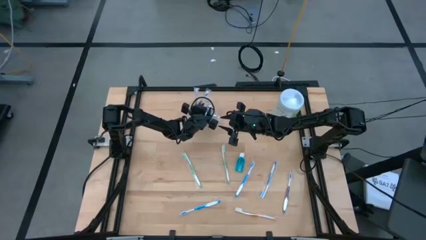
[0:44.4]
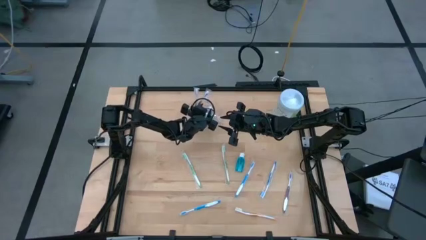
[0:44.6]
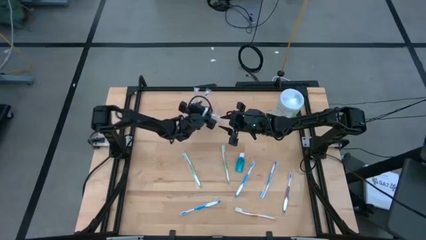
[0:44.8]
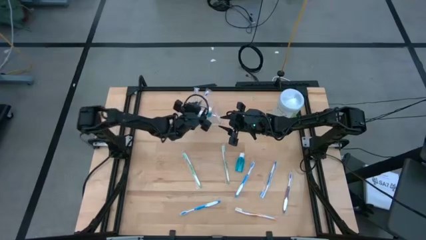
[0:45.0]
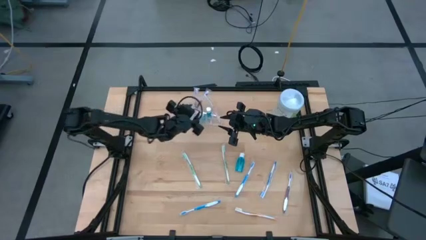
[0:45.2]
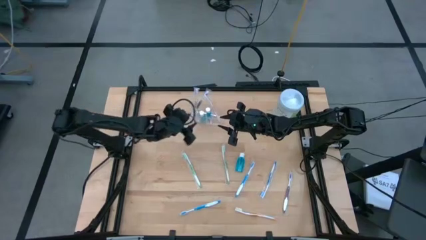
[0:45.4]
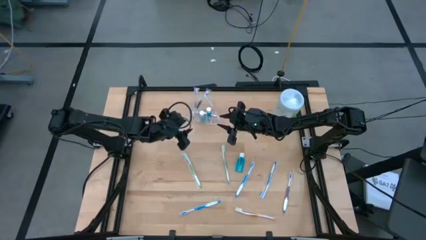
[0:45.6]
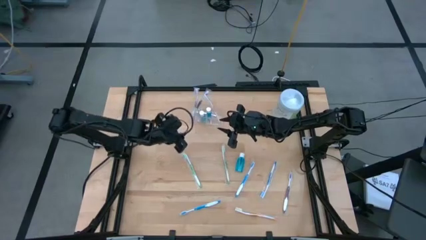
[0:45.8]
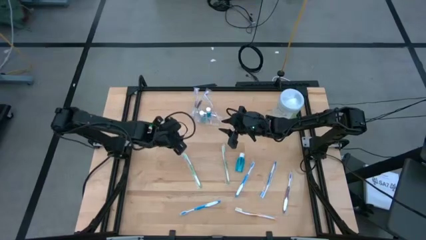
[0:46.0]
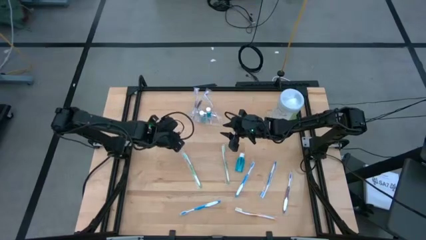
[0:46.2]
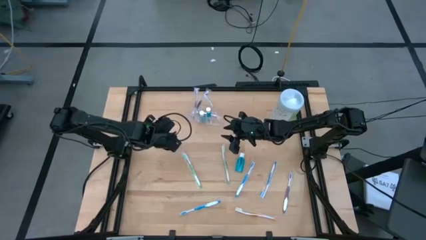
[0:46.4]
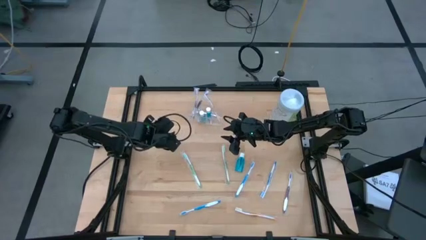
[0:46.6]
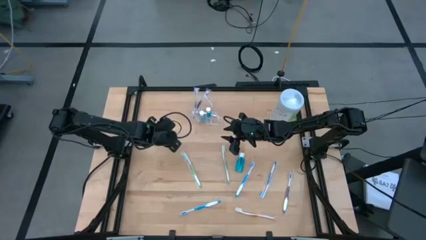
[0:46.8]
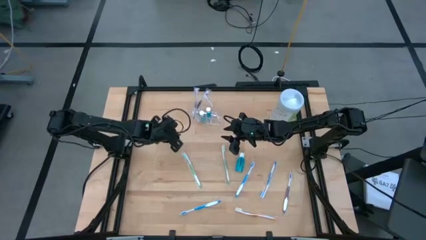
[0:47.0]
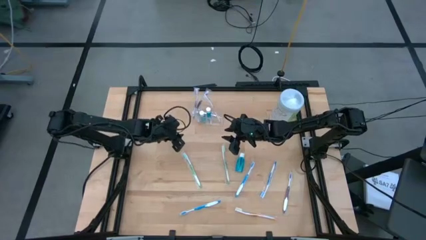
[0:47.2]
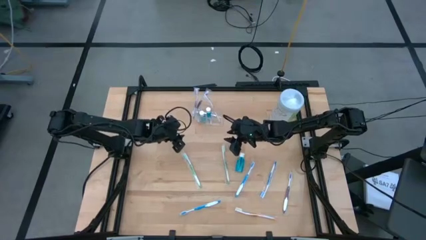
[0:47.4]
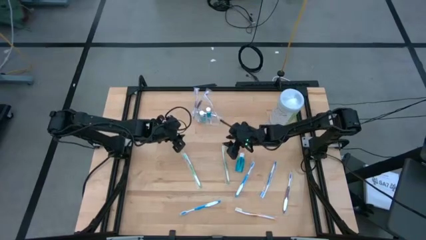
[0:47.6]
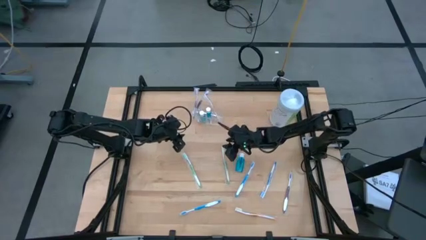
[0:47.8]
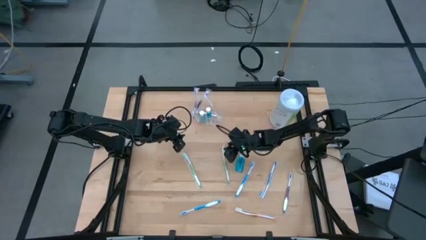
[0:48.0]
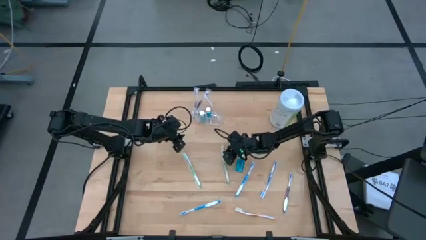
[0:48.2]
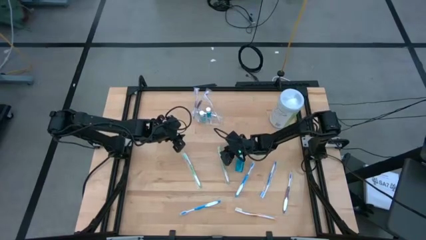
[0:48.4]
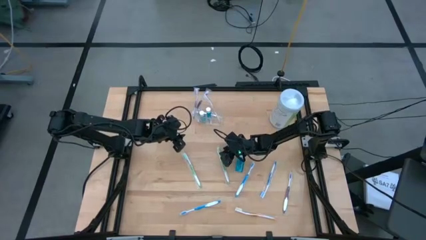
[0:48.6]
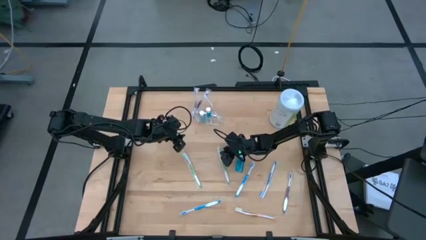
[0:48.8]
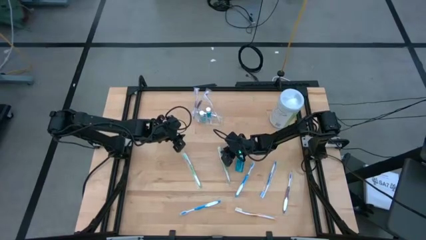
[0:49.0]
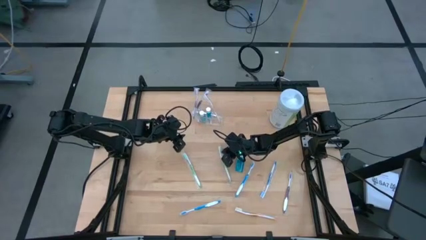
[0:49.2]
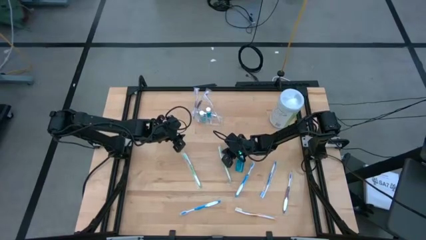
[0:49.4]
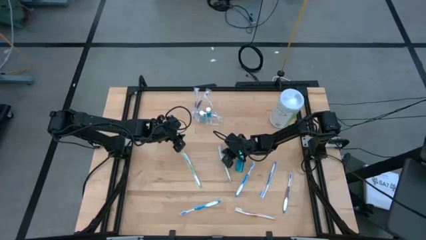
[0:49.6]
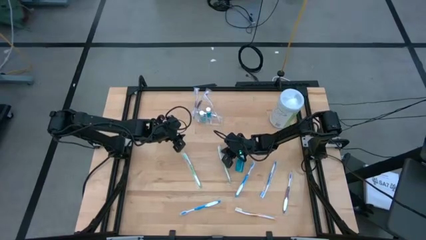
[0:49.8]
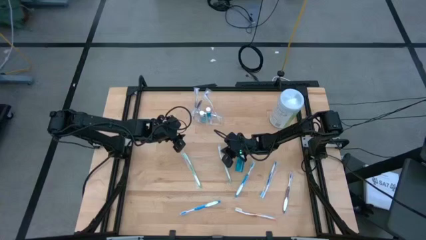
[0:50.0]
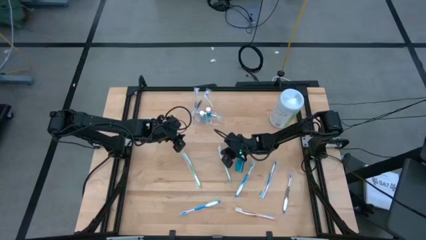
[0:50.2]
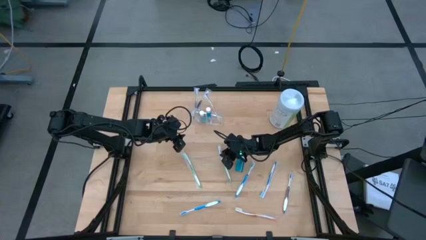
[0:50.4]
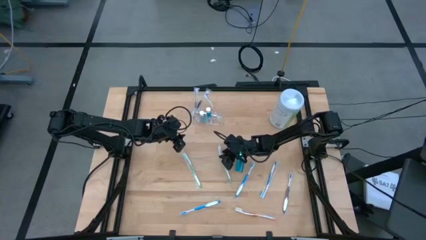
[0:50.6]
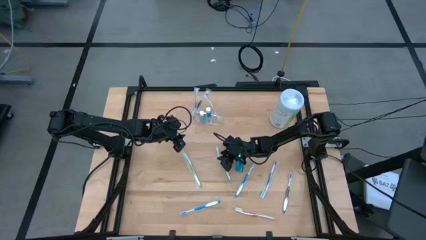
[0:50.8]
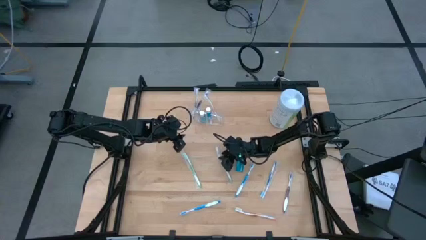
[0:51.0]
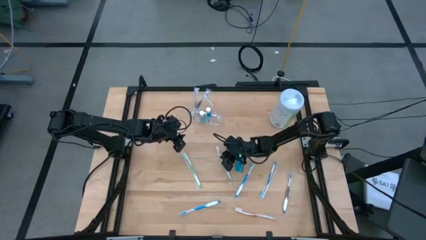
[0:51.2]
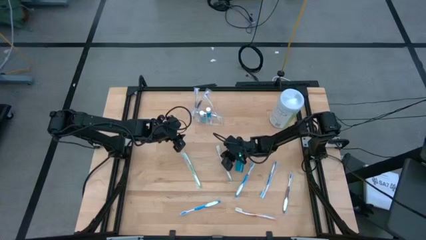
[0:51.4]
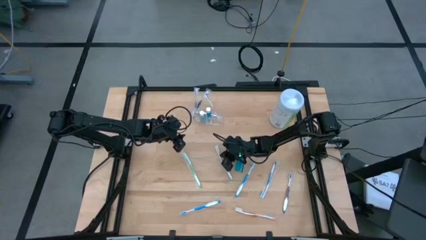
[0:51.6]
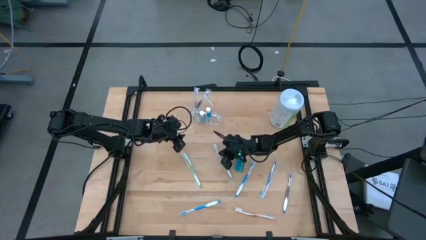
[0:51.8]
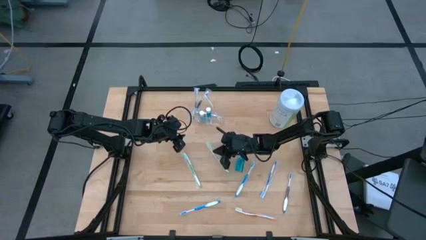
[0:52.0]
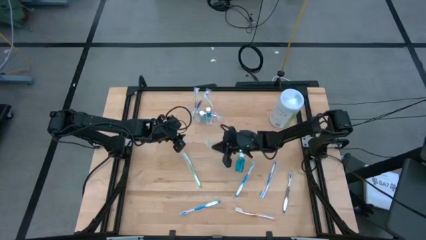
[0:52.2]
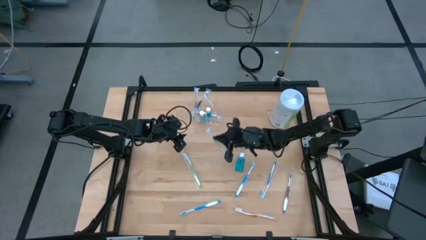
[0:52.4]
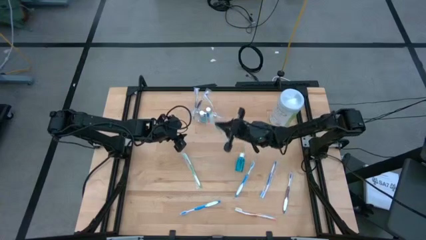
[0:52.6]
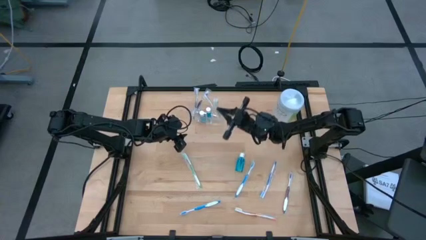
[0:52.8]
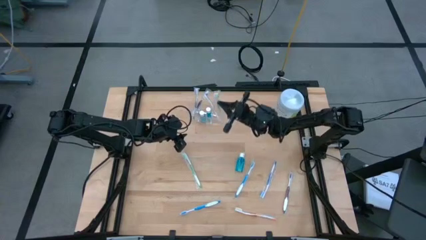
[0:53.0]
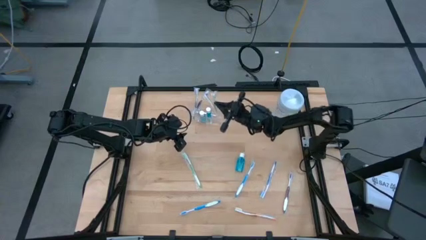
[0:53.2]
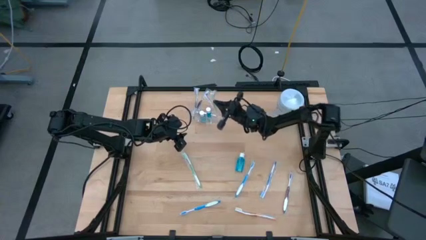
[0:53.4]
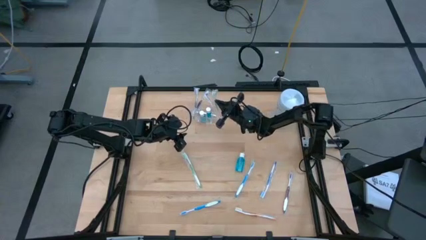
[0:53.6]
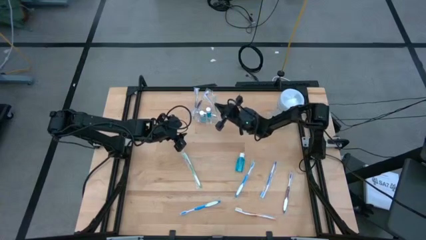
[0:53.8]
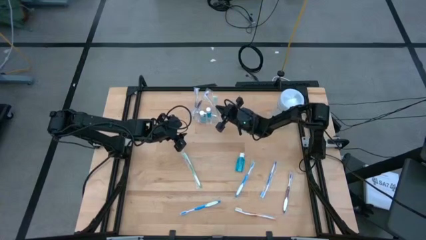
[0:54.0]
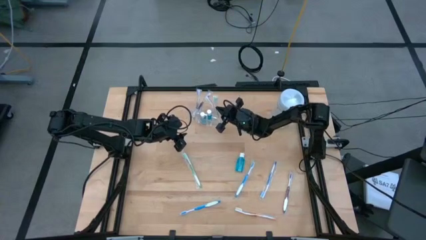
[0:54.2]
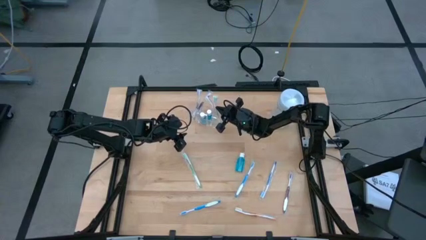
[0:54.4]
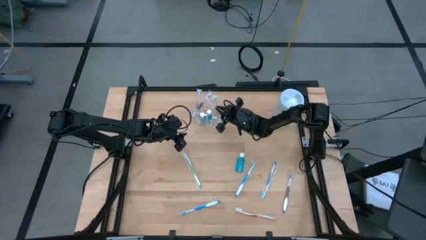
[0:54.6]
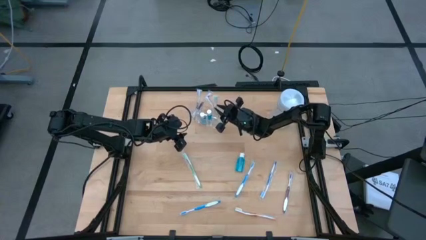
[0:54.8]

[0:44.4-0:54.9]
Task: Pick & Place toothbrushing station
Put the right green toothbrush into the right section of the organizer

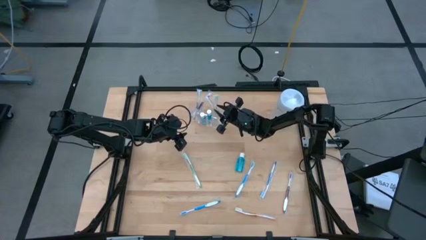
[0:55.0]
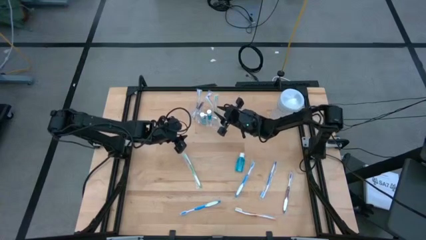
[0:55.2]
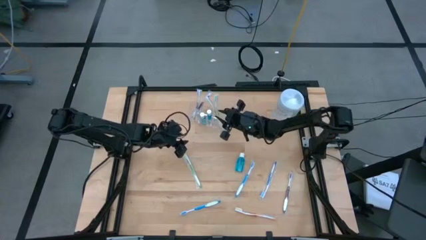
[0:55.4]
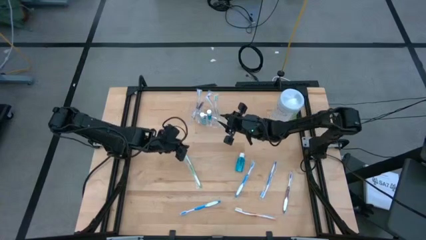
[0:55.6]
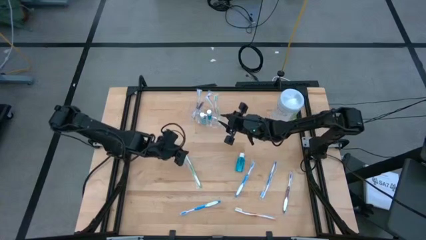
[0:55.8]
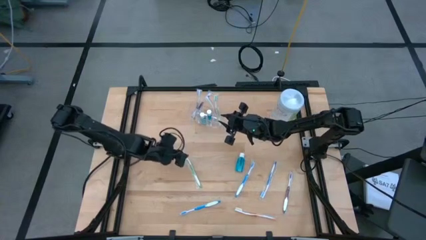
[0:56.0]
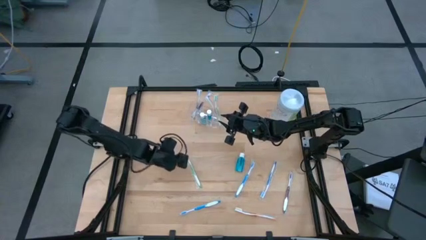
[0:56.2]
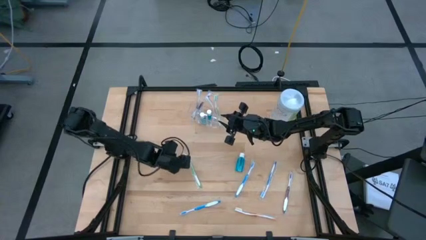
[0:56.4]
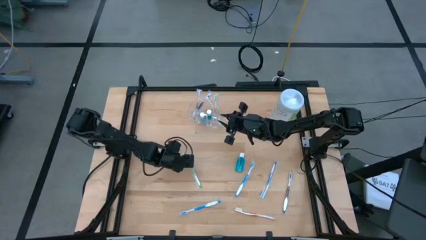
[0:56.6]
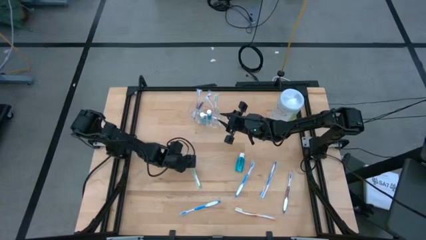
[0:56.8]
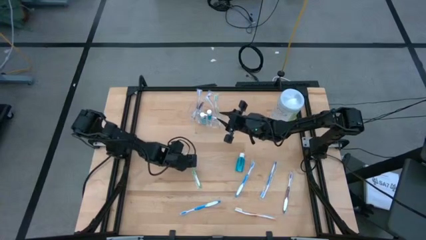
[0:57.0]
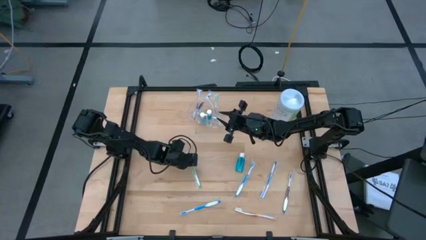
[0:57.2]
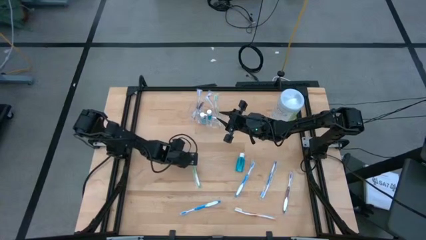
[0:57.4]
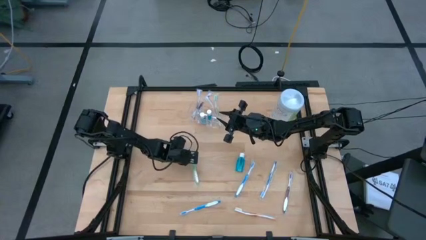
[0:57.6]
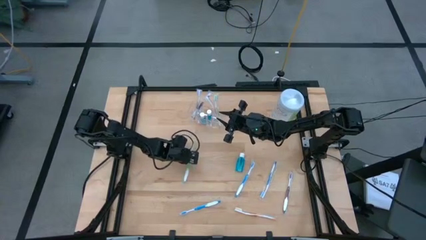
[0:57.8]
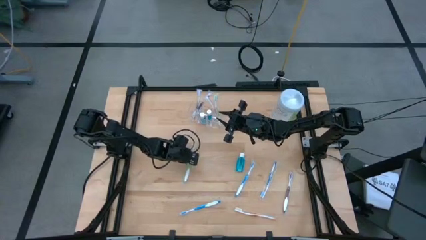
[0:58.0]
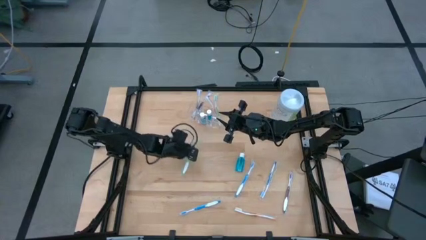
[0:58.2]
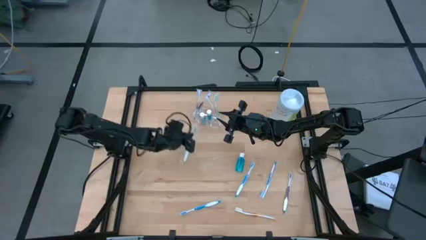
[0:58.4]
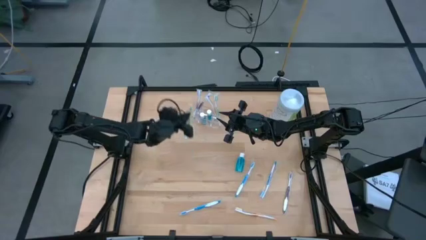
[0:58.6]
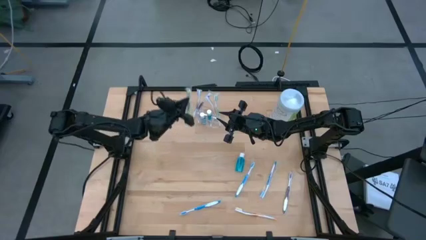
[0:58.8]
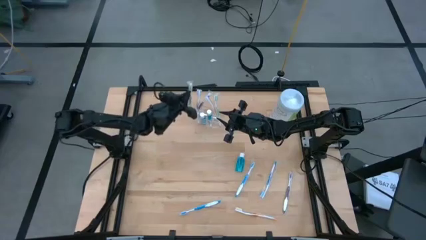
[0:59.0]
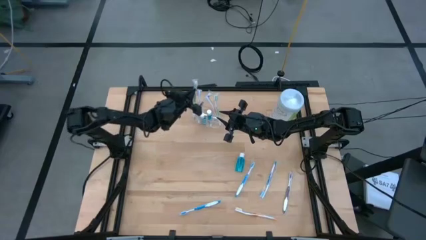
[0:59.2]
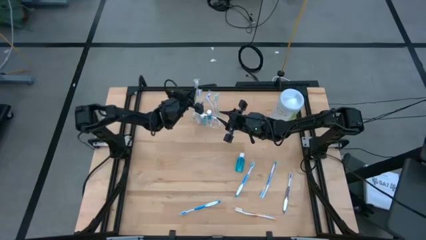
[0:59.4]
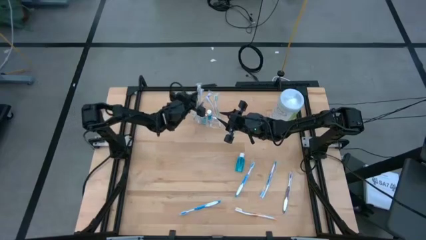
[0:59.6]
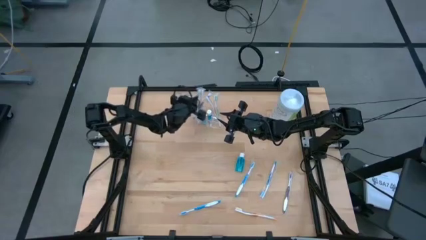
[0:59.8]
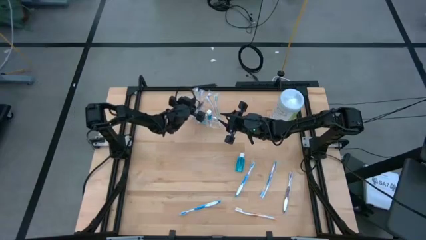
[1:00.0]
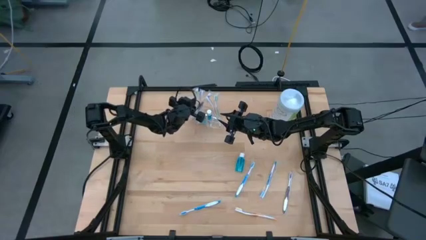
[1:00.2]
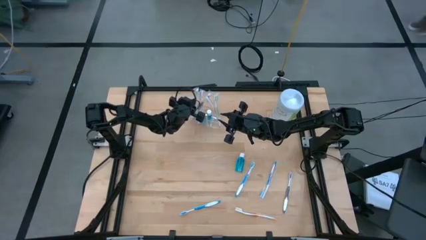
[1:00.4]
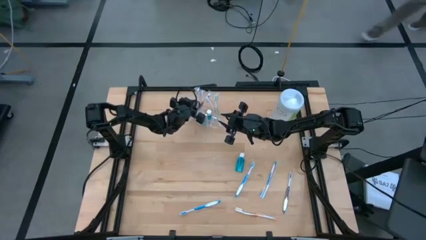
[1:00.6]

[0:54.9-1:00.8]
Put the green toothbrush into the left section of the organizer
